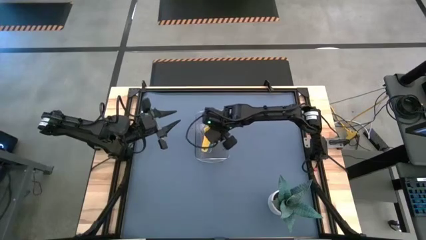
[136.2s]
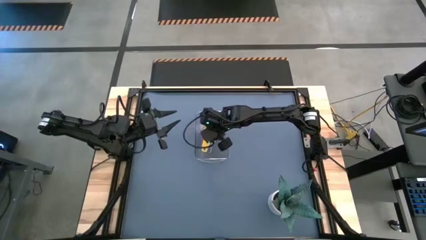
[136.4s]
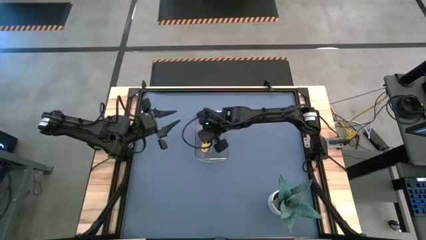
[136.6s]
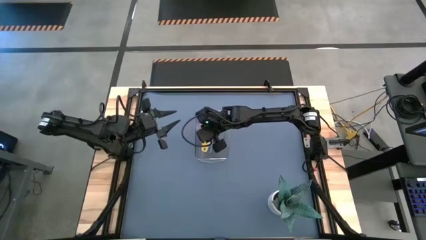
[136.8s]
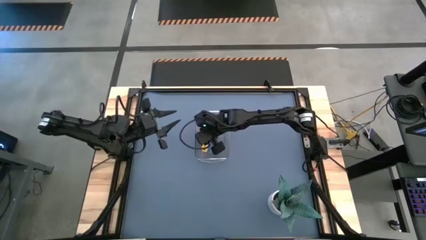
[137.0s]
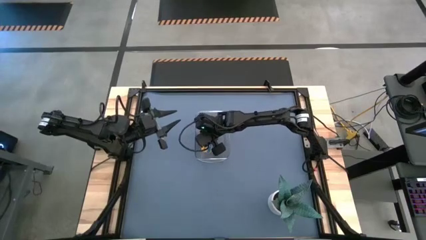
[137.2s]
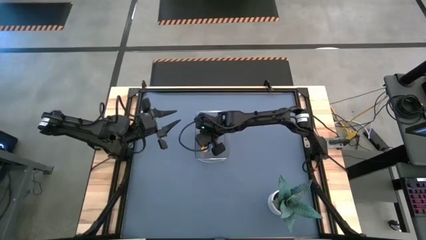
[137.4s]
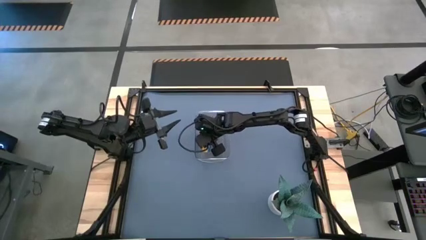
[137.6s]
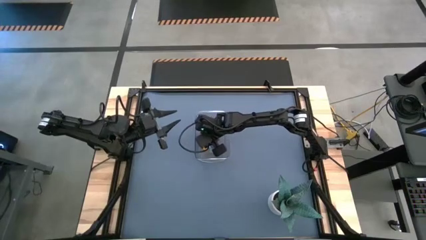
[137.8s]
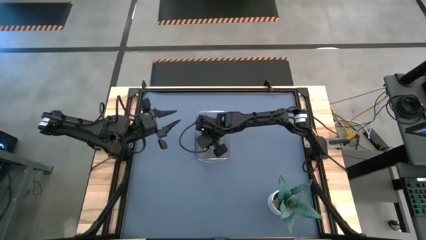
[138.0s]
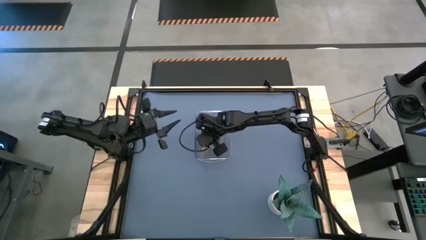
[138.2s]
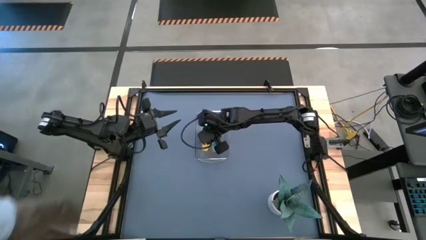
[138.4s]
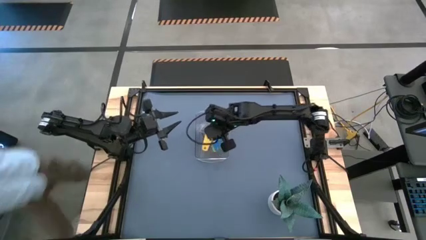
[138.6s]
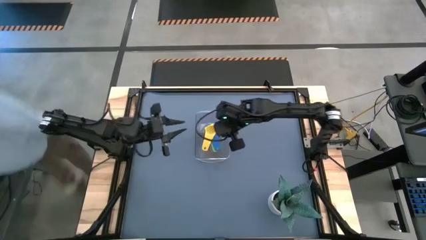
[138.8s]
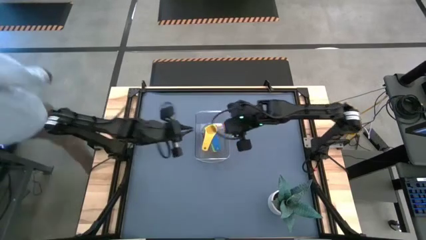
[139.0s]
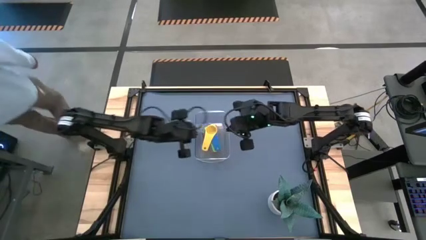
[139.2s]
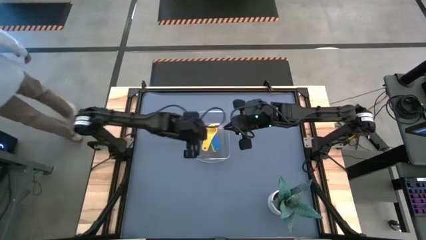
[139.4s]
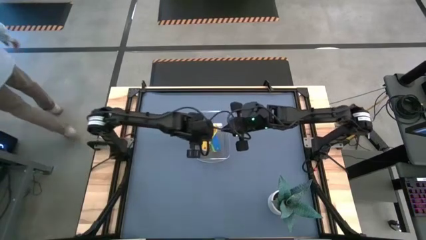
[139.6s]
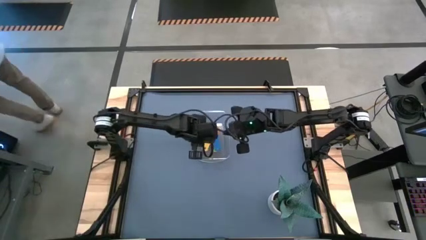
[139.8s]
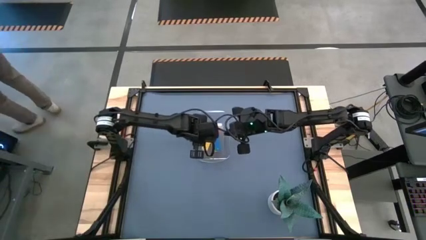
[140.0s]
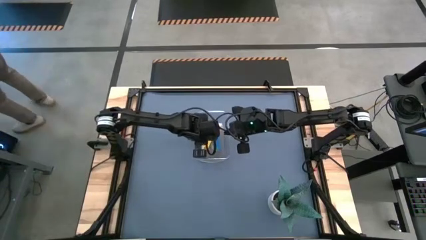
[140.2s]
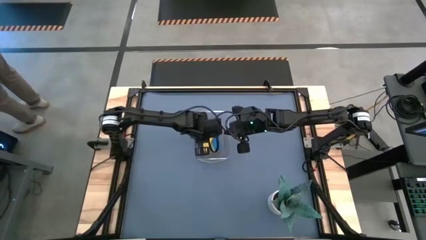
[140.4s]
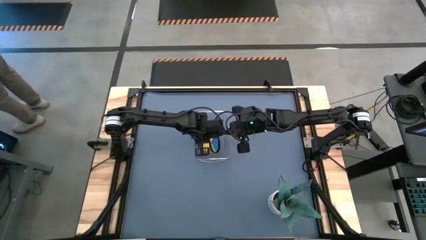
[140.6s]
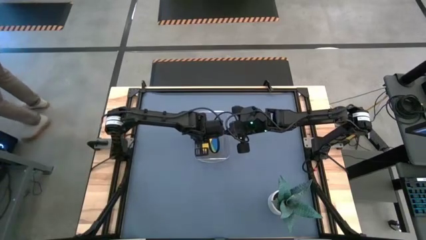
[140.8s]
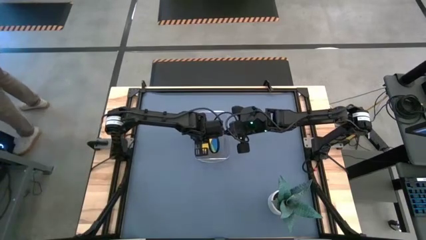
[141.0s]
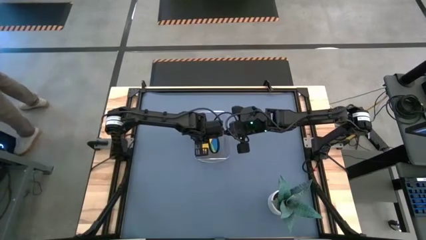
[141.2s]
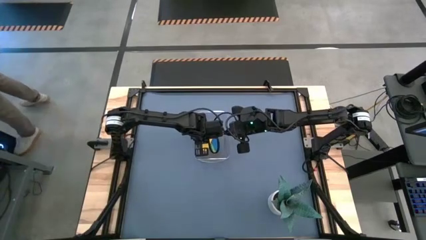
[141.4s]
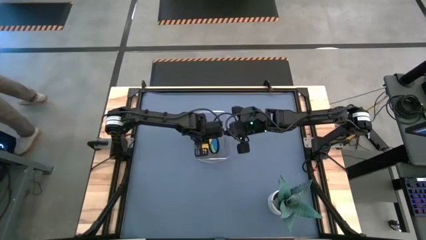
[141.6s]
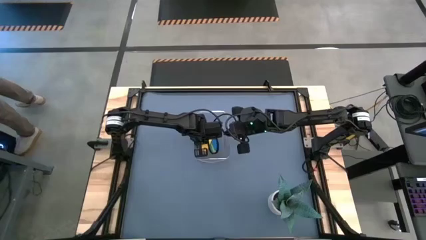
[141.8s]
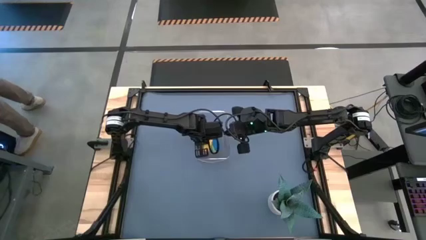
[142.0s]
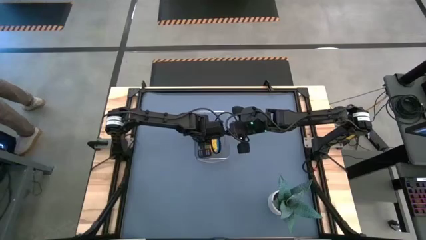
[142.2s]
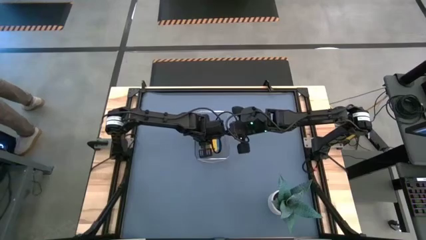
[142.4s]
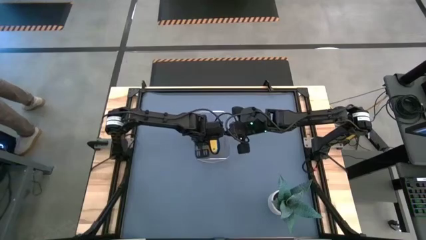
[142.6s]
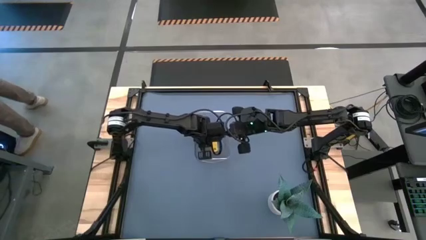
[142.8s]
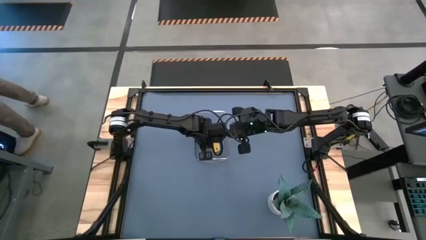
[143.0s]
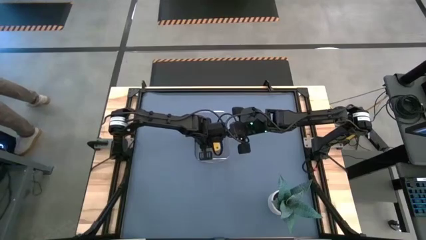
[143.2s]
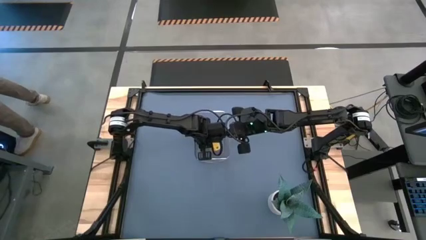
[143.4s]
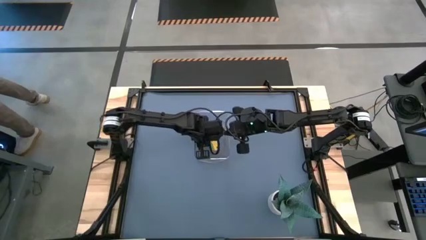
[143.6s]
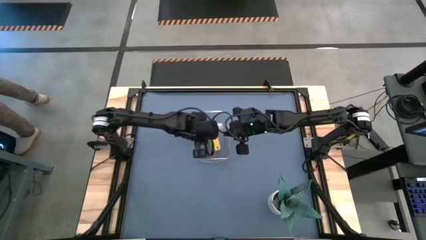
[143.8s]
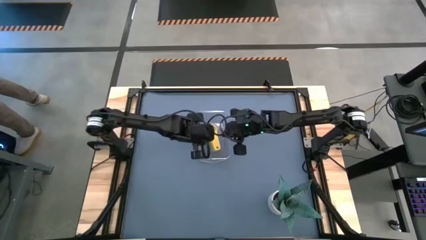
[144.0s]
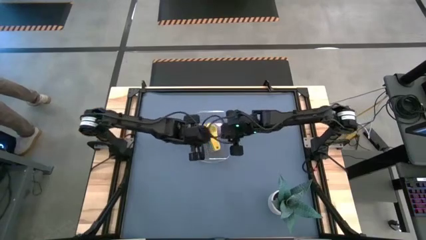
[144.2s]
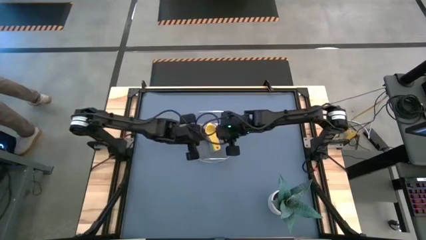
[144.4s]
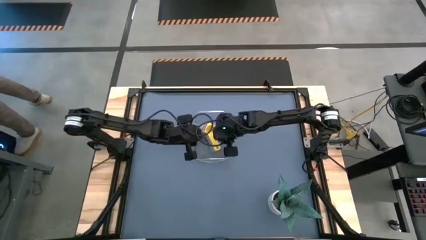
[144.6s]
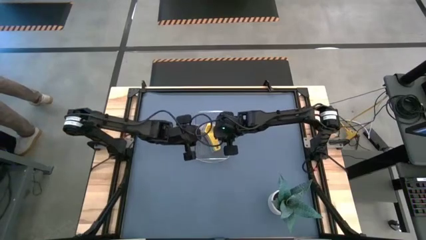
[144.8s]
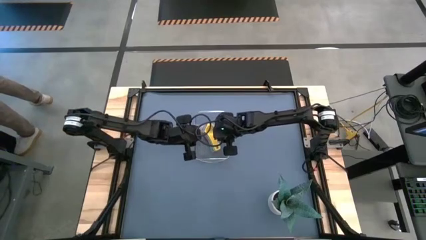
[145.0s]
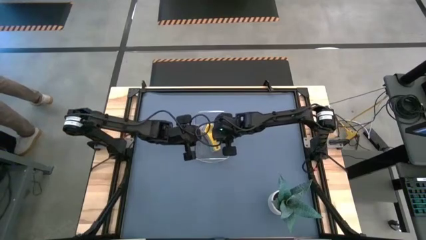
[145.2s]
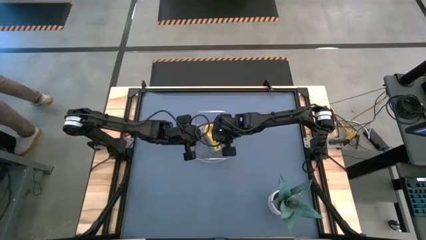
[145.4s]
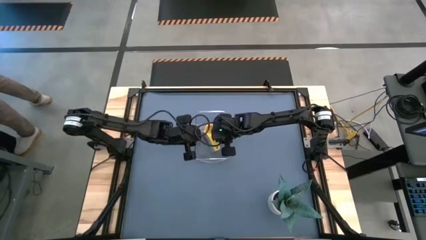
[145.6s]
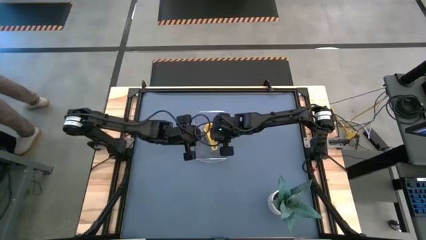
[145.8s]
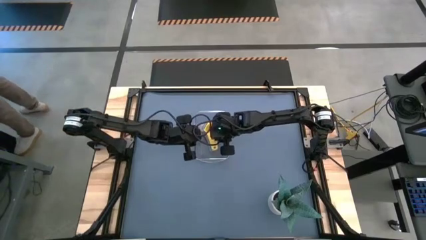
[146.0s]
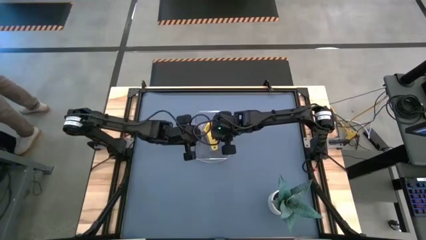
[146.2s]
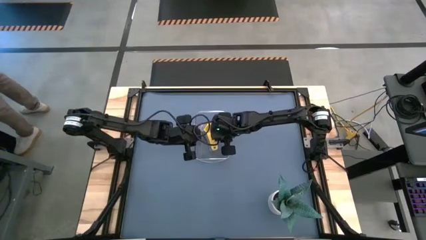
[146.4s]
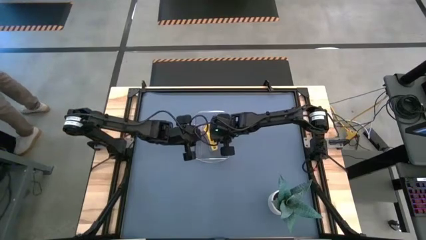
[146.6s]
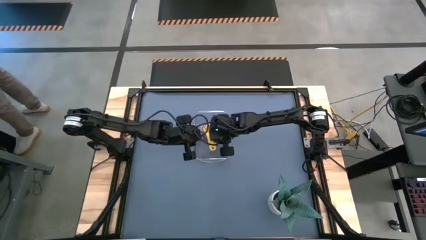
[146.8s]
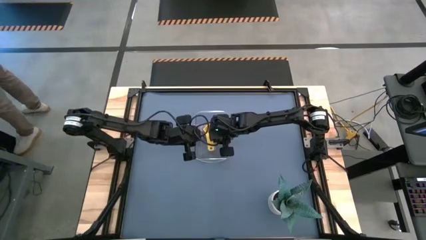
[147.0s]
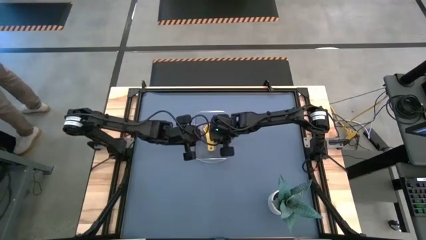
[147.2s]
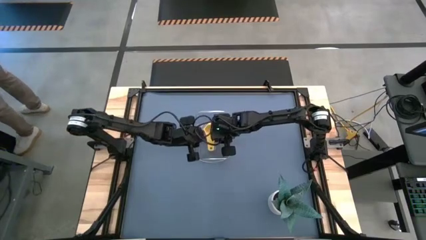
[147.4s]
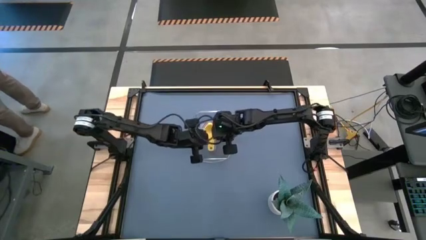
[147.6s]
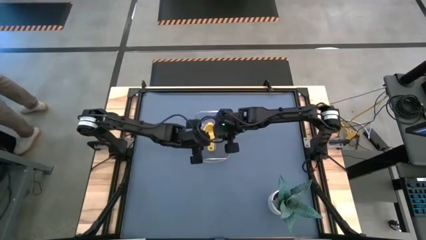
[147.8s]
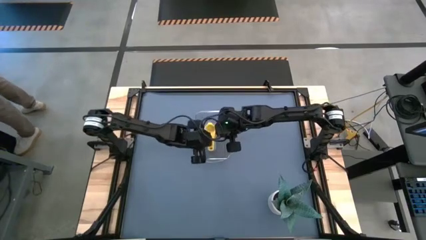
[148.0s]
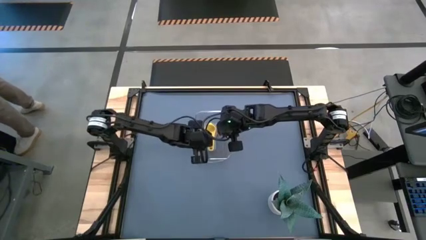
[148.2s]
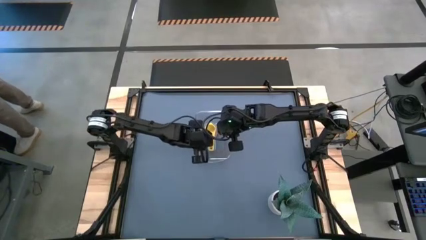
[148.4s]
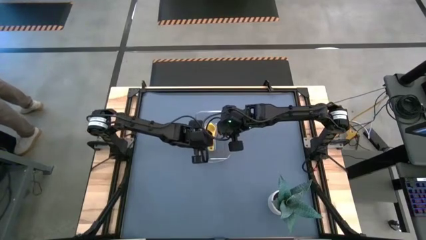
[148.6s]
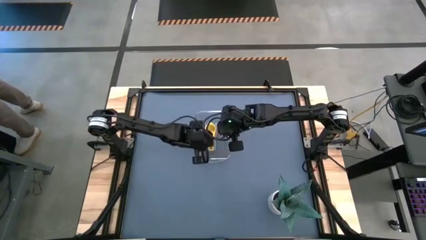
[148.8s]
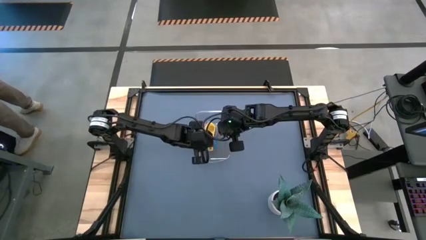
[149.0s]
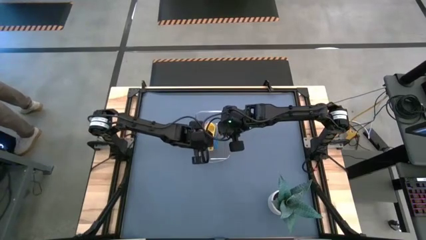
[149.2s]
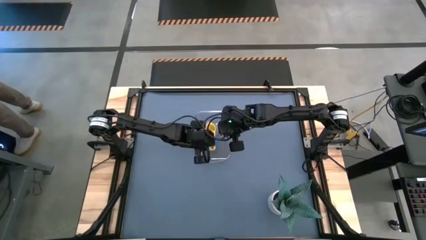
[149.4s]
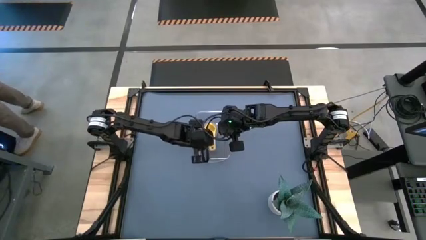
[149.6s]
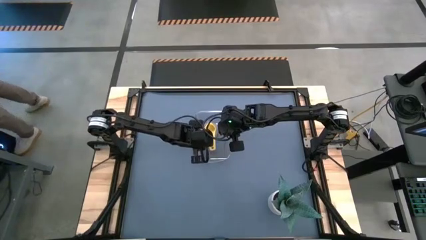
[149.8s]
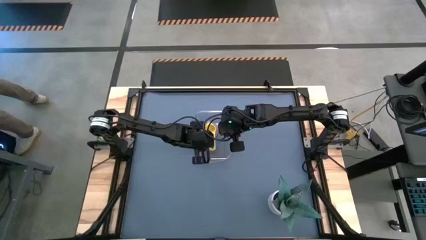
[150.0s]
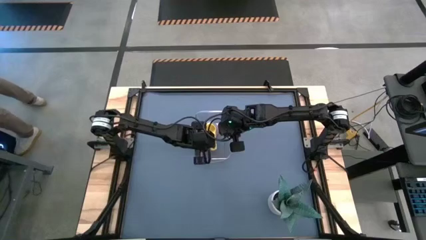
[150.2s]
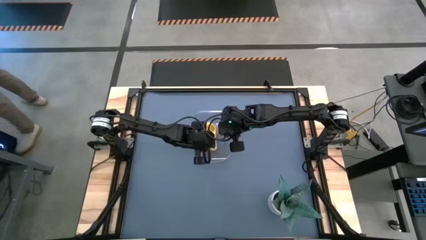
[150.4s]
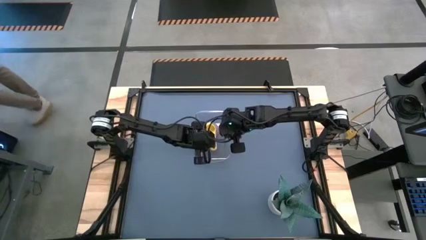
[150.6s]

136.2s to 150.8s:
Task: Nest measuring cups in basket
Put the stack of measuring cups into the transparent bin
